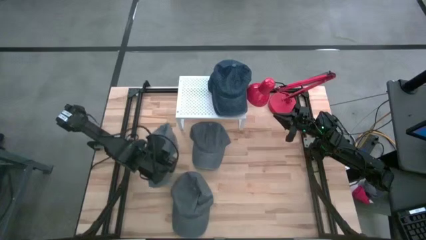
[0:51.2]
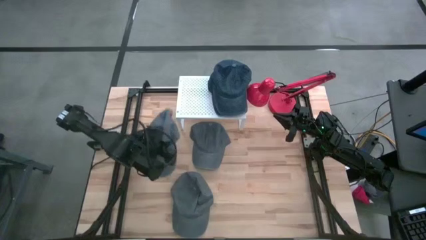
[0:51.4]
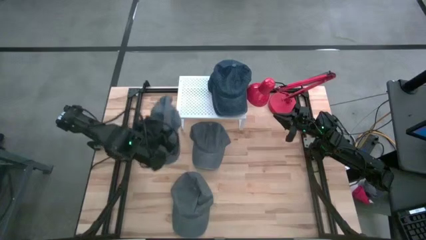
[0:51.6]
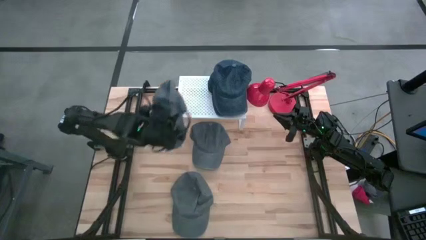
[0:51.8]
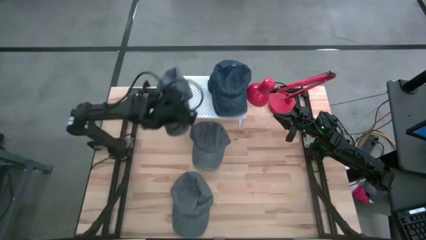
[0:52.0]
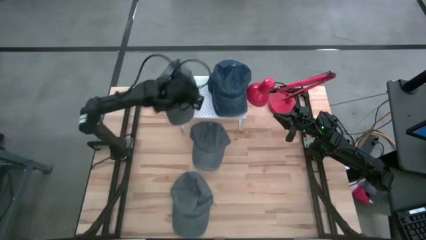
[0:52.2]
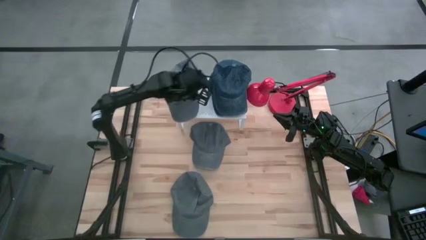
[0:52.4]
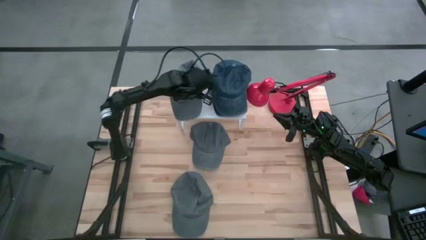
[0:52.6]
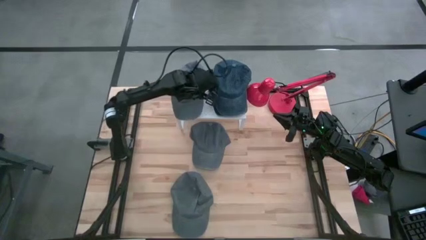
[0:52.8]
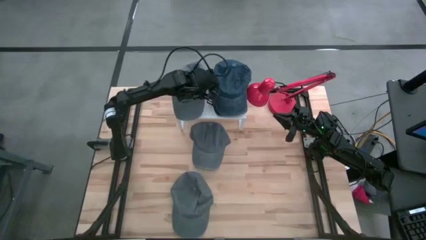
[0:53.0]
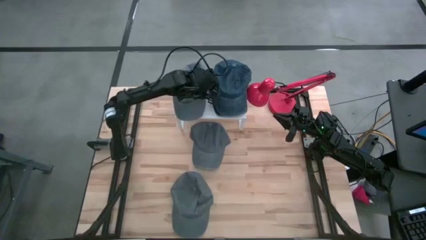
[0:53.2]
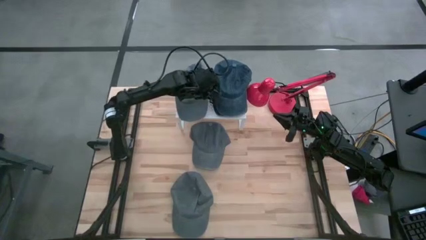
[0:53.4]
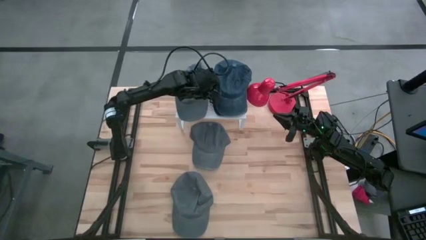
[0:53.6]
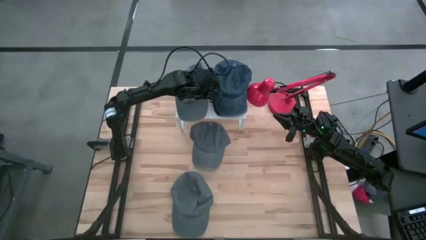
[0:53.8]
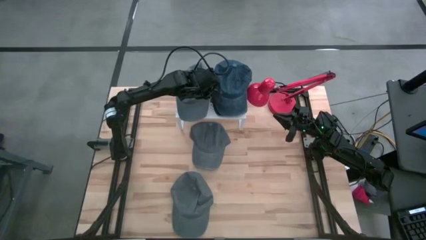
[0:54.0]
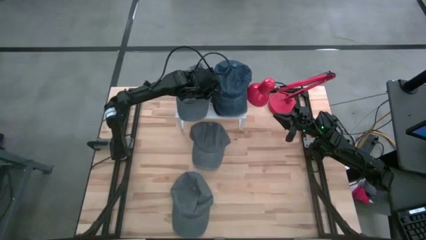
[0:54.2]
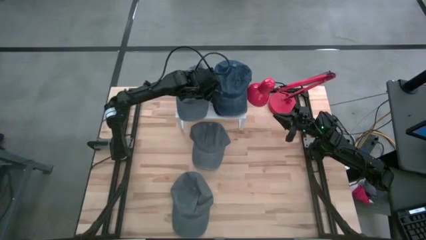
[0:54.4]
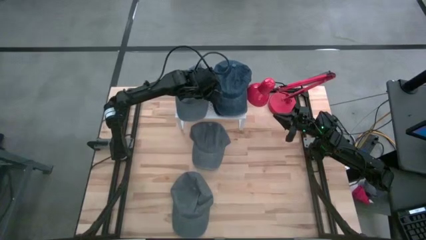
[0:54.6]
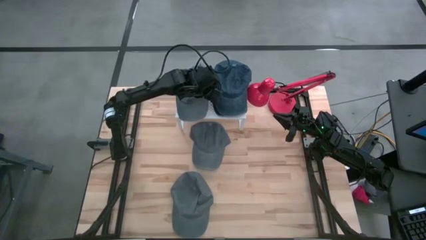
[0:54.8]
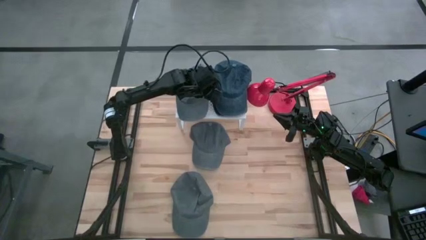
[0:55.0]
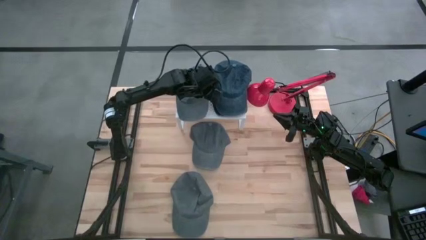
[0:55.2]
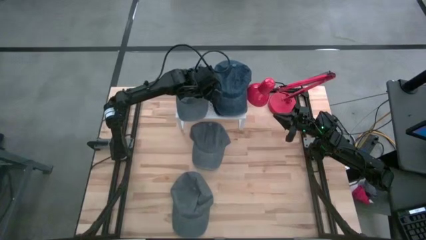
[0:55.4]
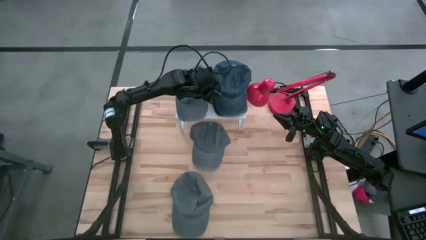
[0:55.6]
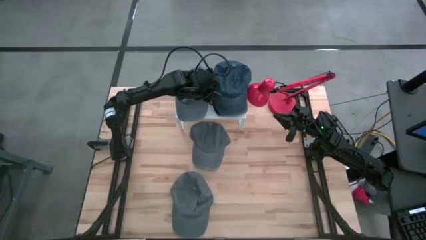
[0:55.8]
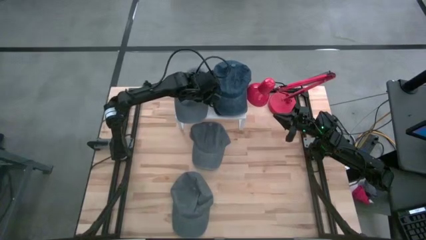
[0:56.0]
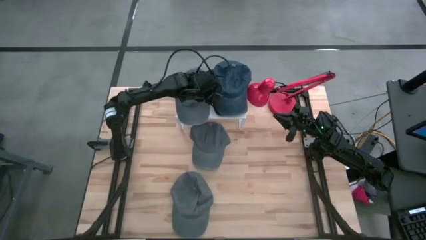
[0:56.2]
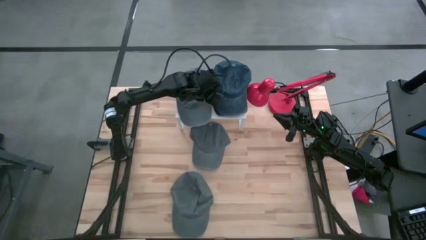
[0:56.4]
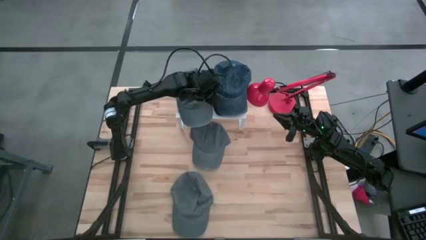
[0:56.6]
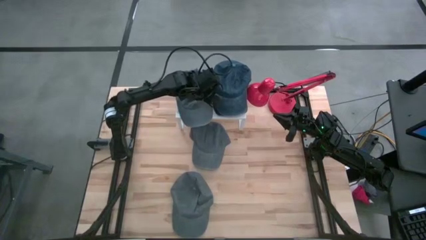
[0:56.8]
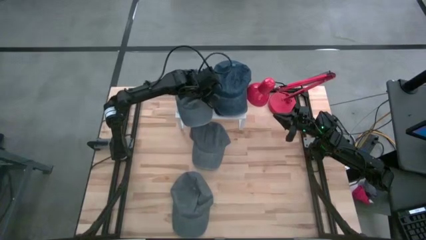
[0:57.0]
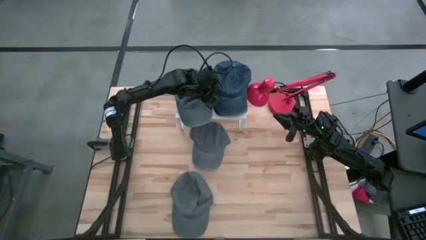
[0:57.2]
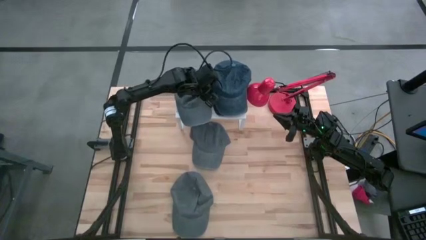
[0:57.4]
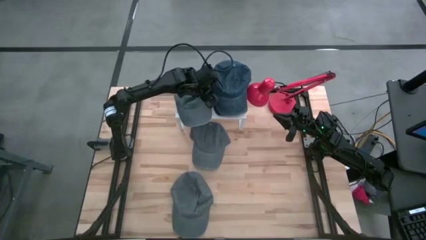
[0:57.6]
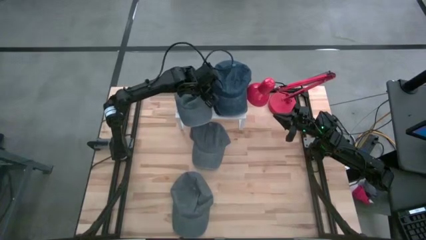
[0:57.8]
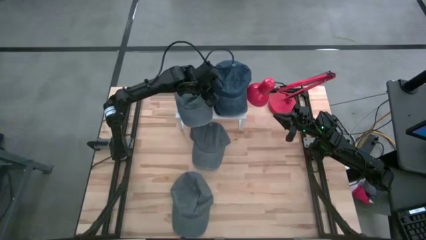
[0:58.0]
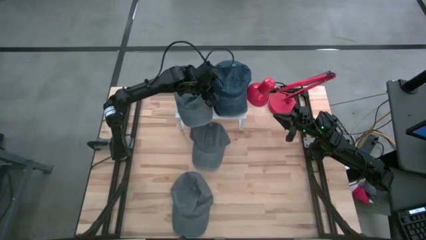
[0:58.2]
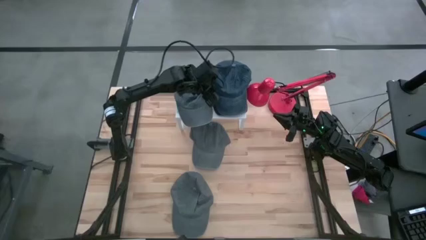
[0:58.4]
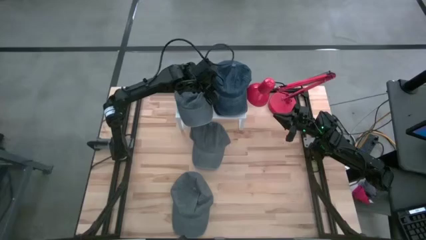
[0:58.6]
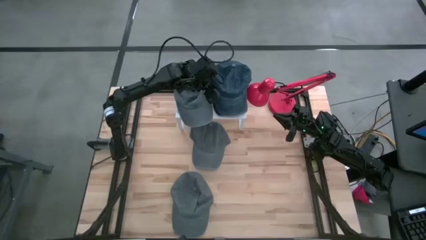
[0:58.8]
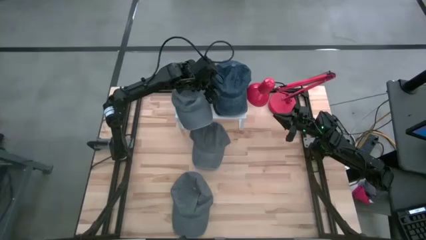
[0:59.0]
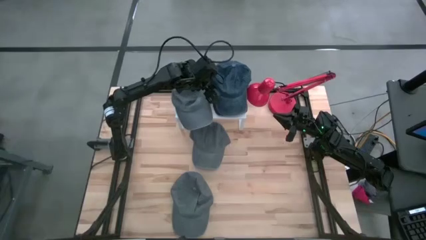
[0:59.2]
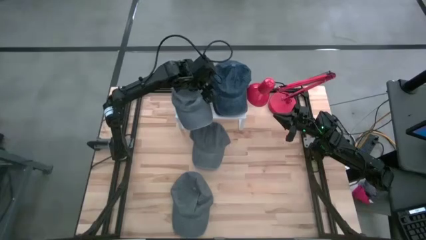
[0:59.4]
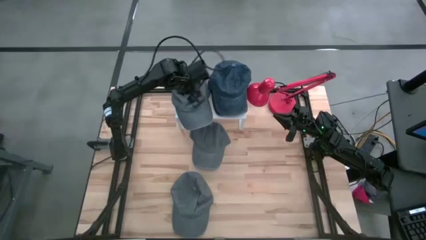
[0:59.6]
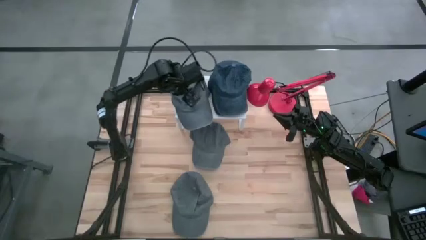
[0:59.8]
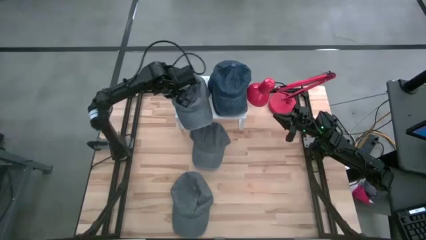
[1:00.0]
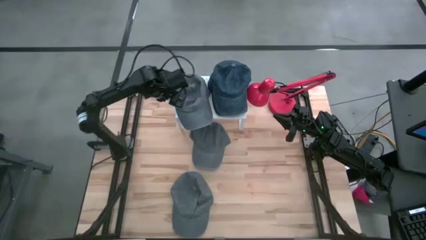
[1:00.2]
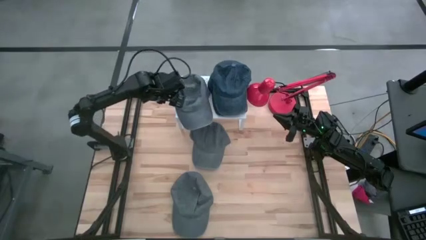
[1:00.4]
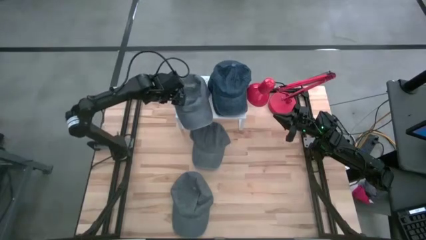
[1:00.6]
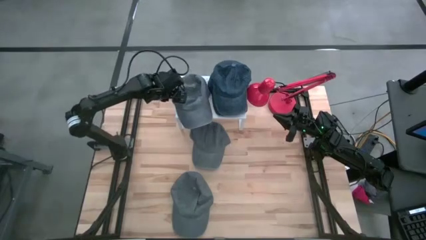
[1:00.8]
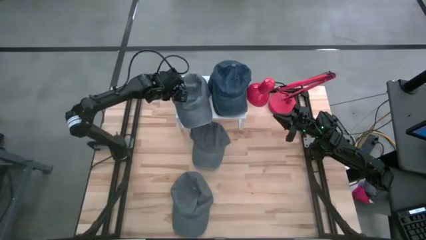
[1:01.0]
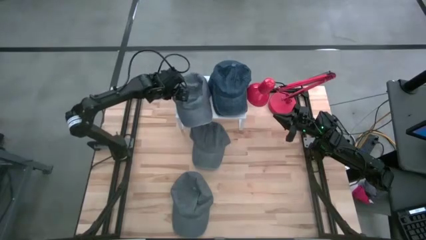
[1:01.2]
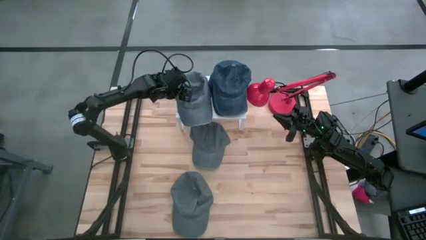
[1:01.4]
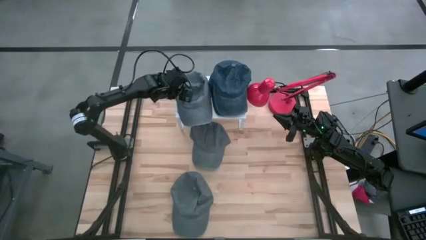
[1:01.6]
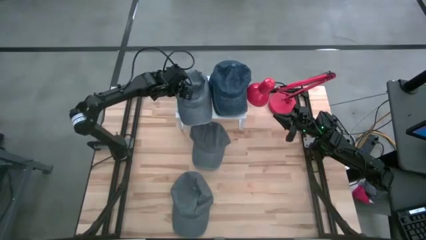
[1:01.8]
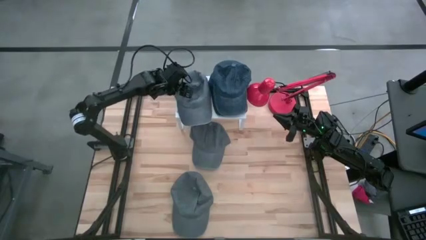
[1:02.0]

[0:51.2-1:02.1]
Task: Pick & Place hat
Put the middle left gray cap on the shelf

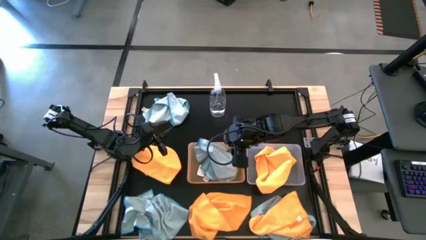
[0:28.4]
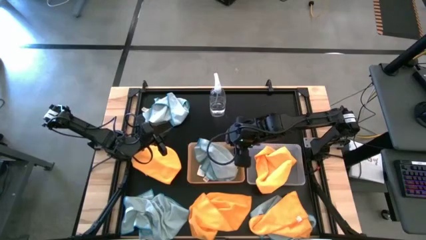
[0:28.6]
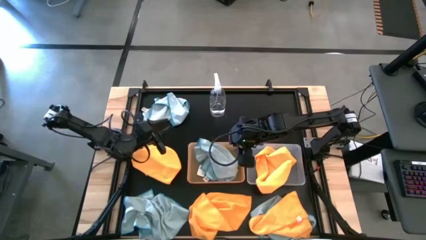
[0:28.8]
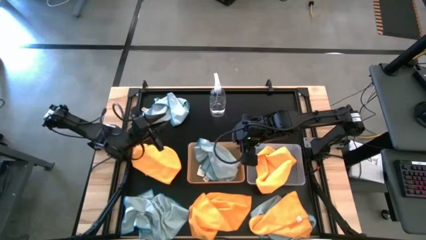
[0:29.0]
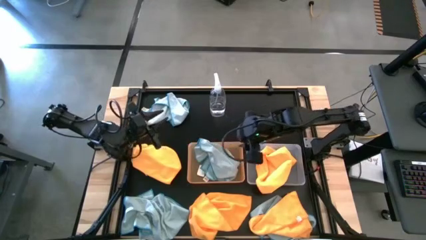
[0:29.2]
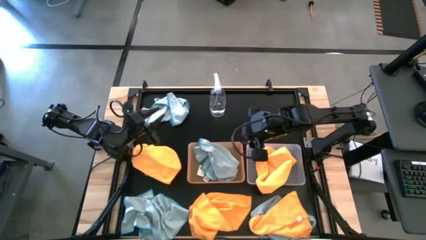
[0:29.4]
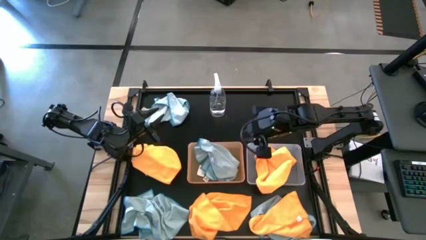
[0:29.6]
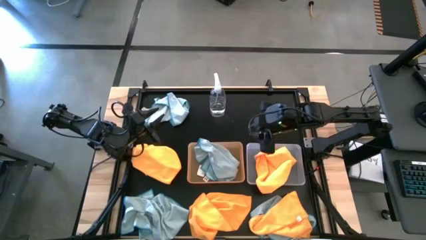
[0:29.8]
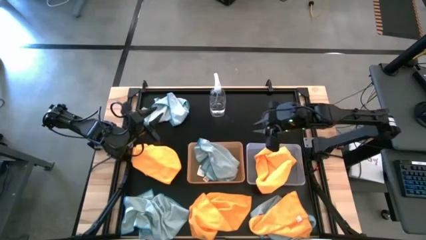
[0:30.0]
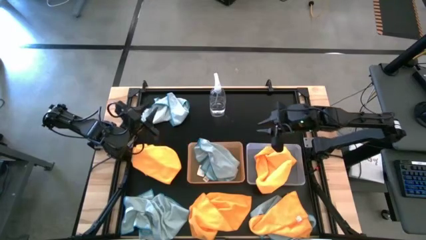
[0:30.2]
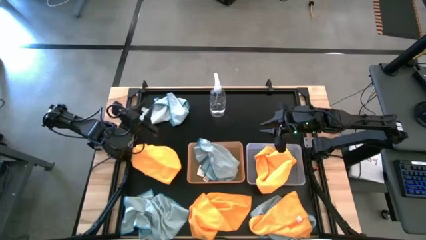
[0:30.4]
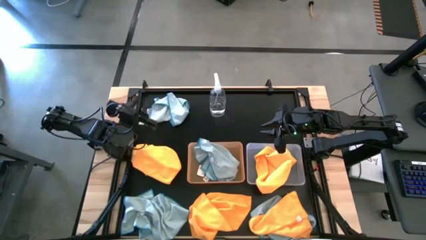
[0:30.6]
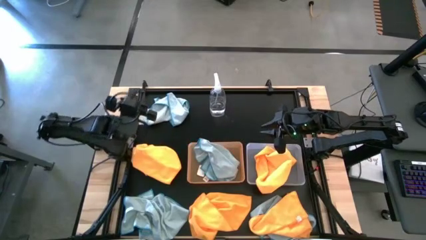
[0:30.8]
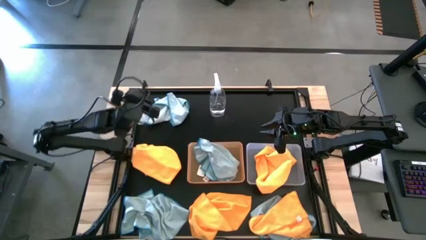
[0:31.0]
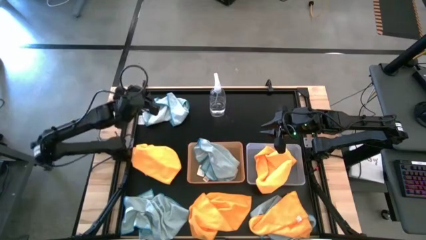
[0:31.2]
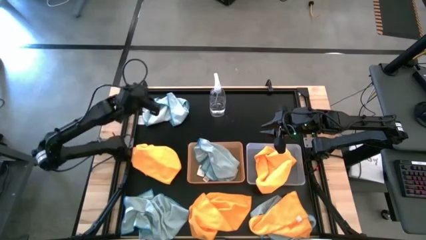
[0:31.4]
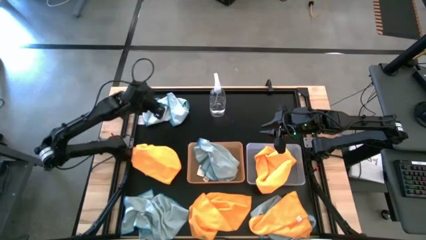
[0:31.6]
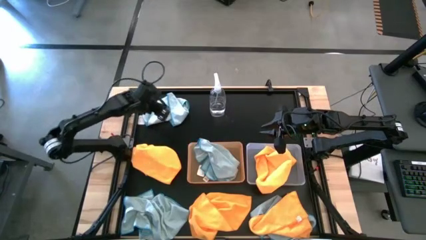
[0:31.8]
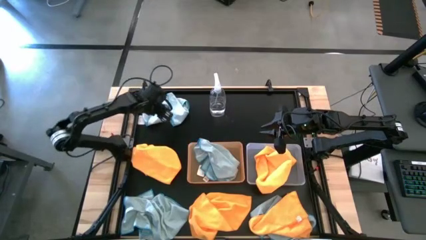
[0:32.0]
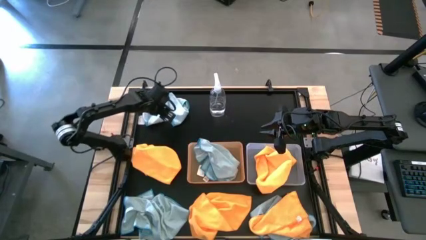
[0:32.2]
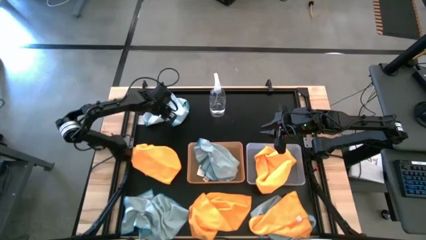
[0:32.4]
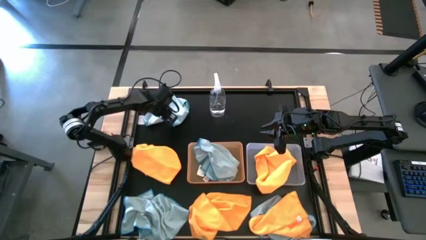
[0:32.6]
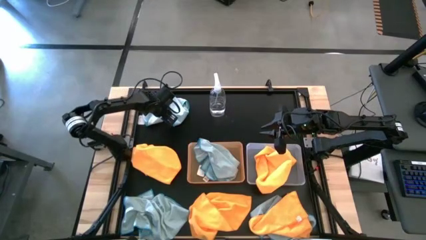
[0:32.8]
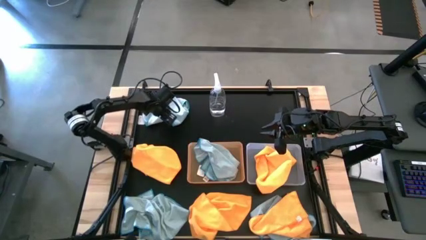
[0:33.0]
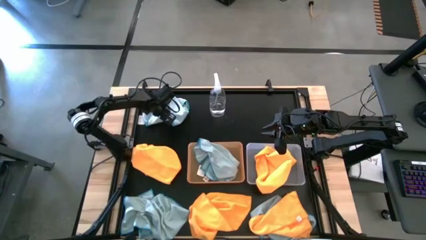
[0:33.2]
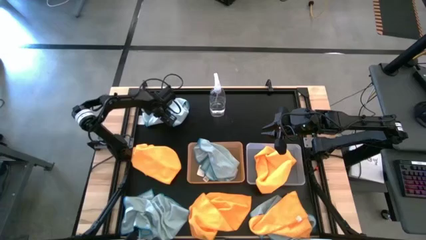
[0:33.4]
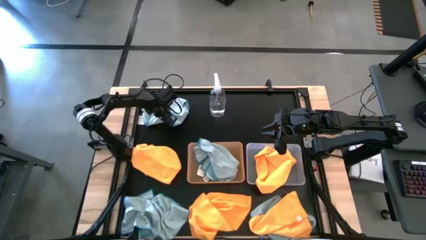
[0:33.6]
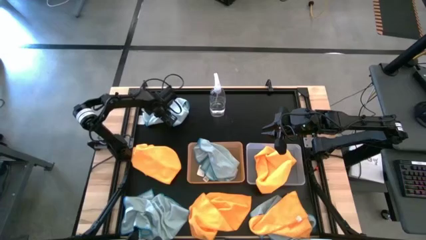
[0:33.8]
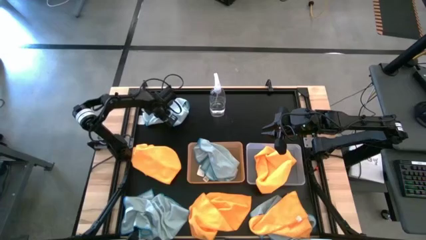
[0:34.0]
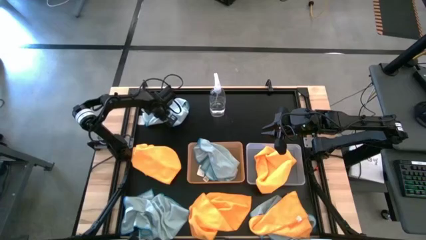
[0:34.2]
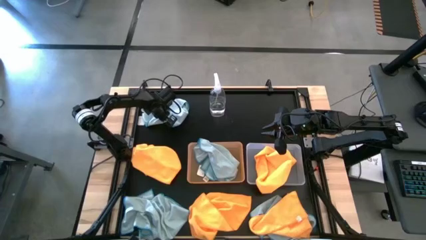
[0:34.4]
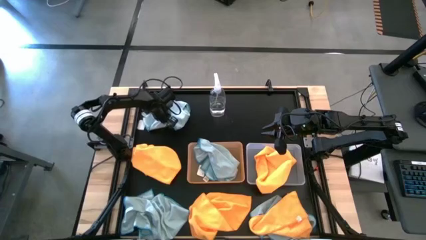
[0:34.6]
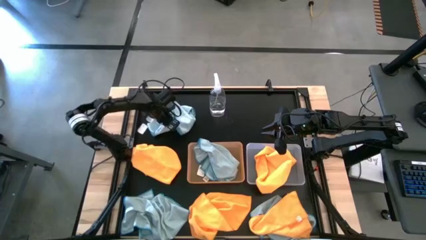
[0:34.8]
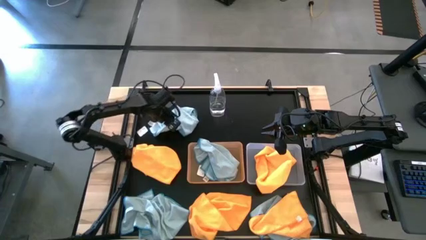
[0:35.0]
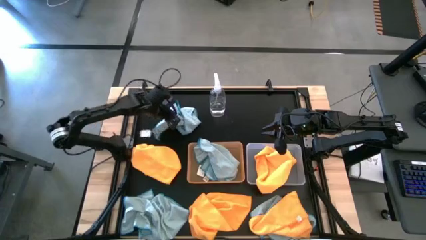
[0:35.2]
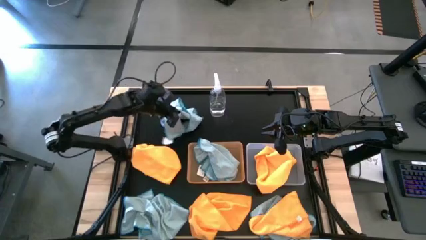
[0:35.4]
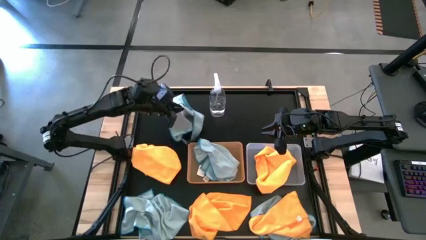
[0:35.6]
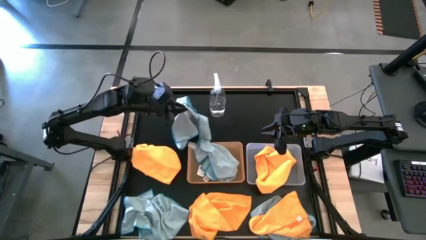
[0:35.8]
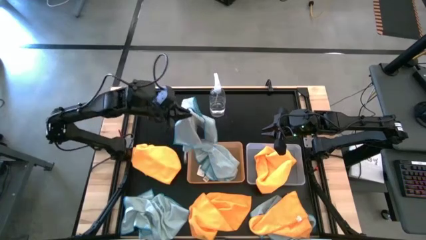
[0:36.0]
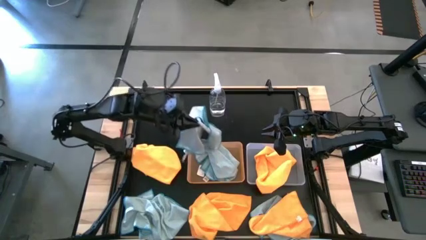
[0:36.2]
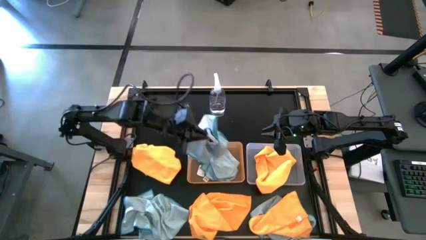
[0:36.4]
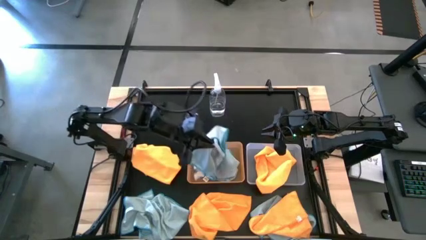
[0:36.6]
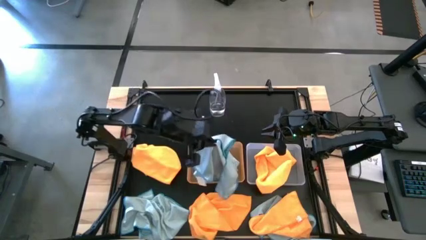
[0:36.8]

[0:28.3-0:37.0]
Task: Sort microfiber towel by color & place in baskets
Put the blue towel into the orange bin
